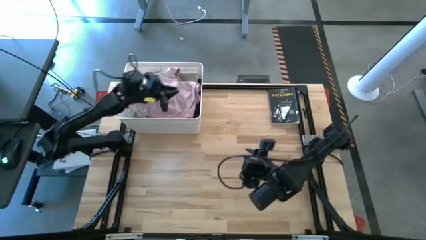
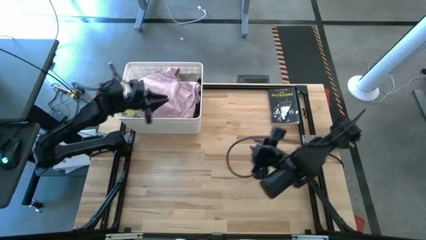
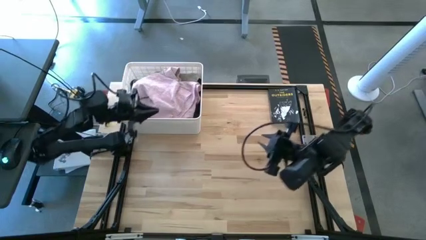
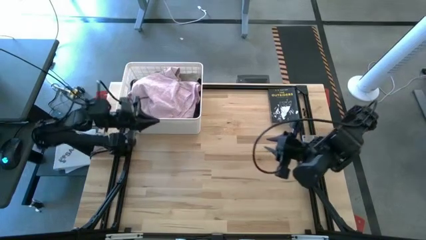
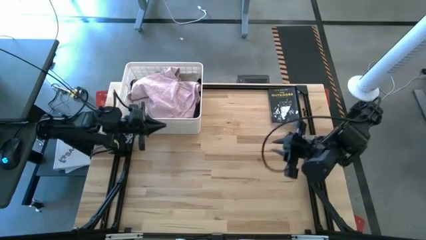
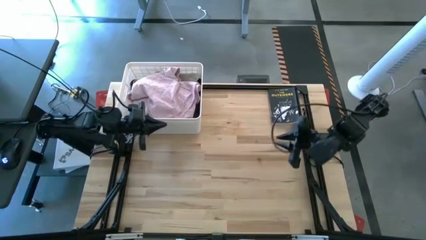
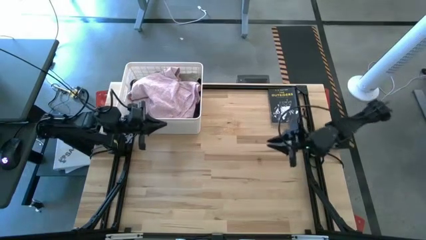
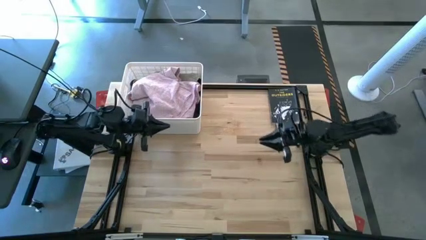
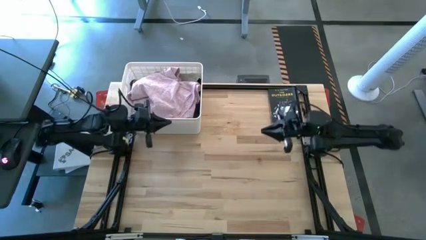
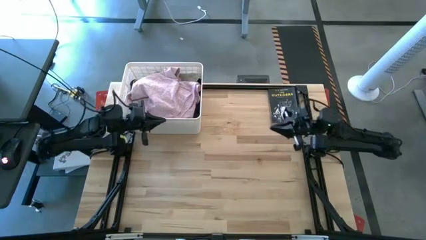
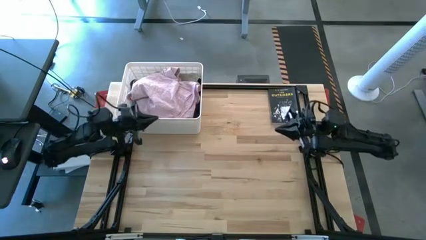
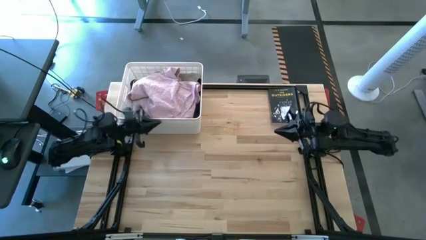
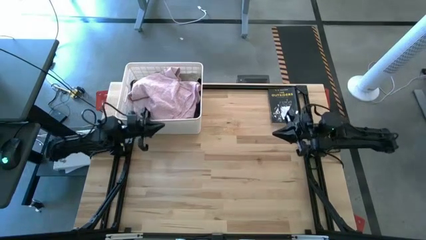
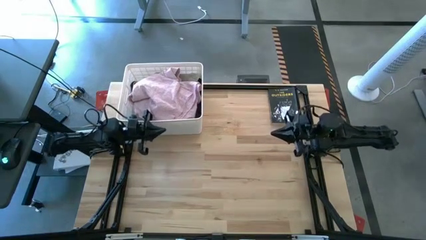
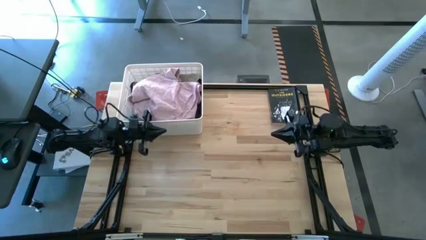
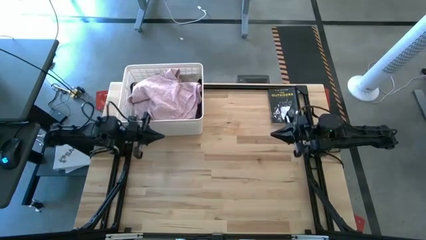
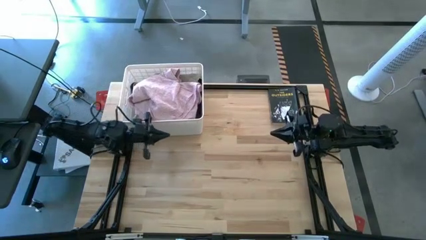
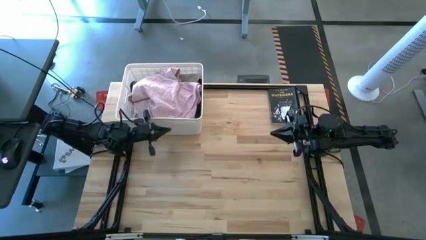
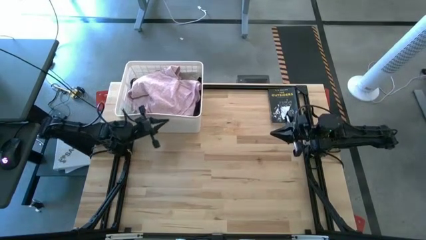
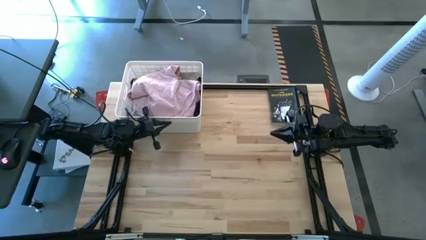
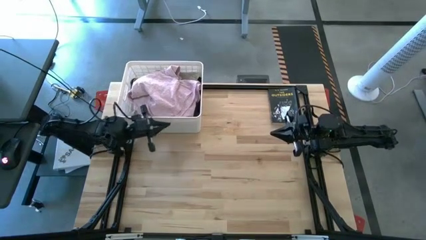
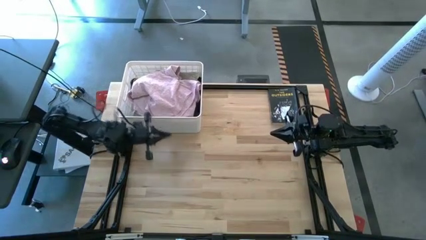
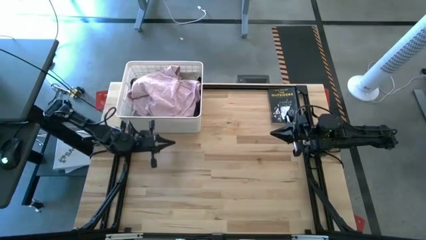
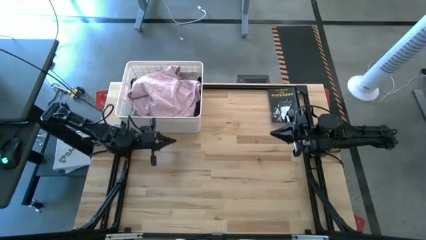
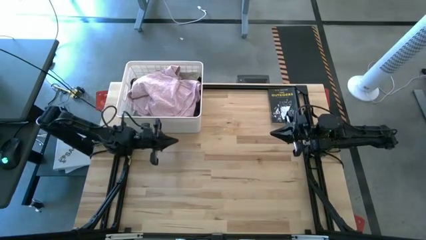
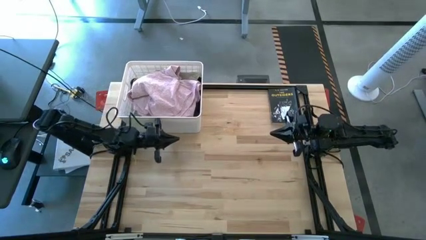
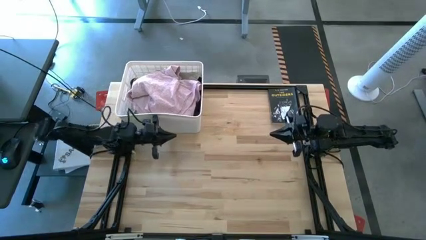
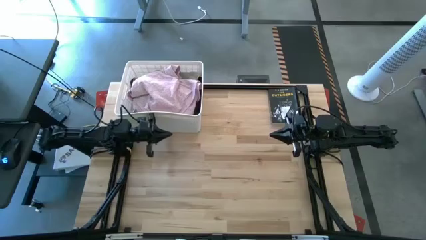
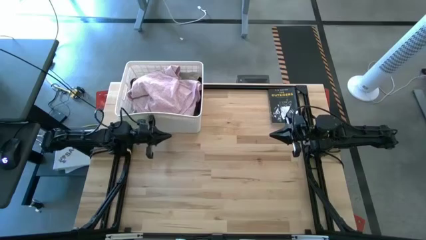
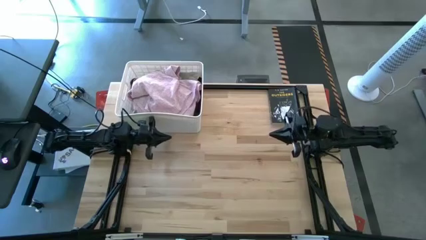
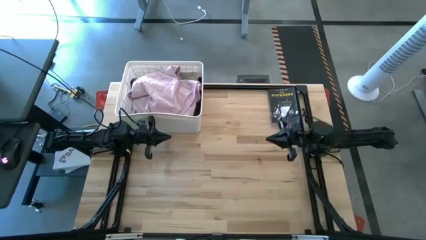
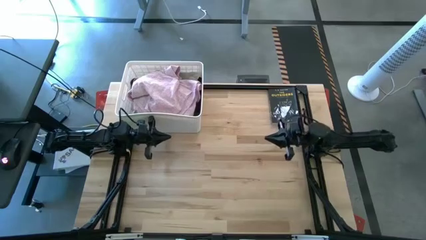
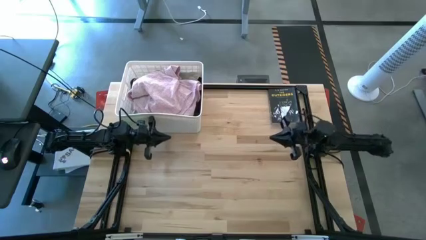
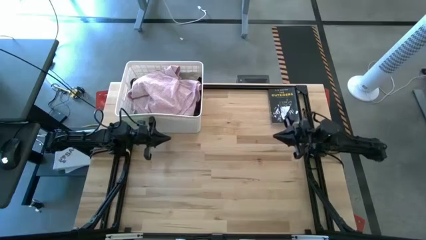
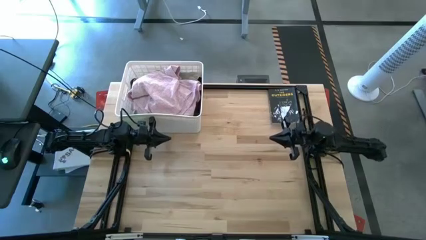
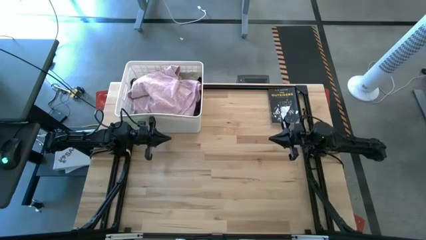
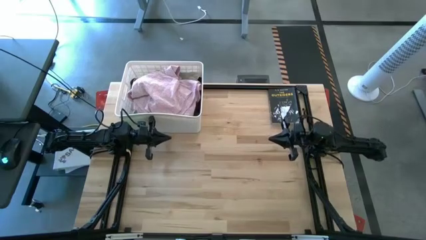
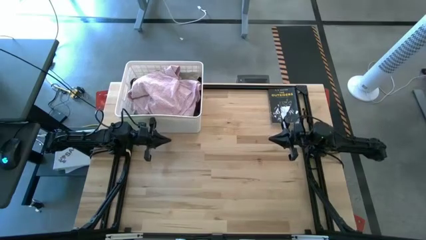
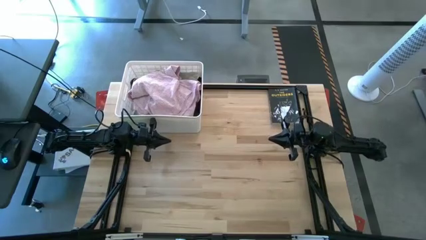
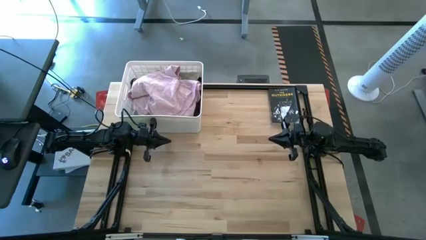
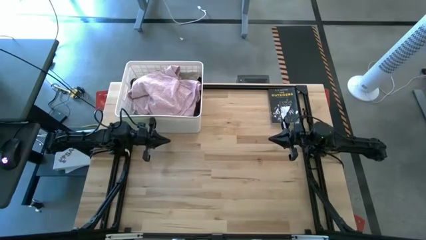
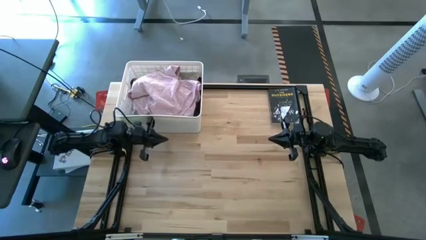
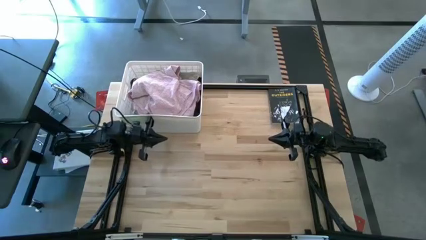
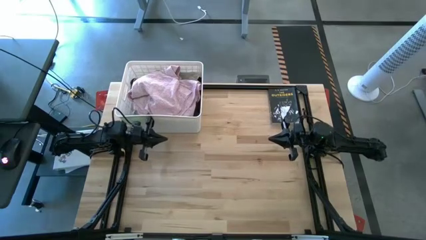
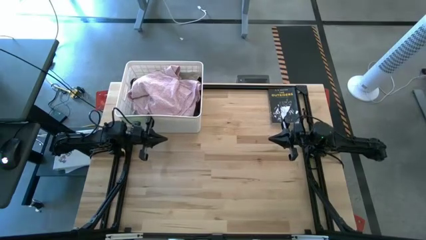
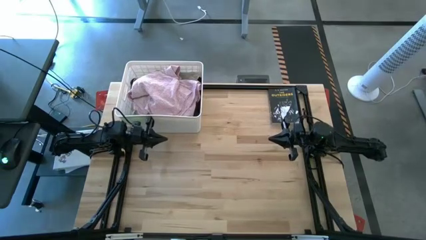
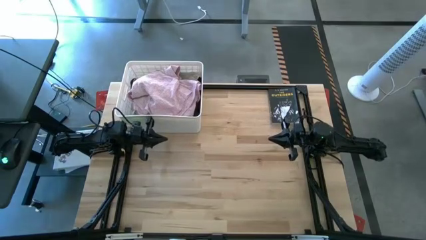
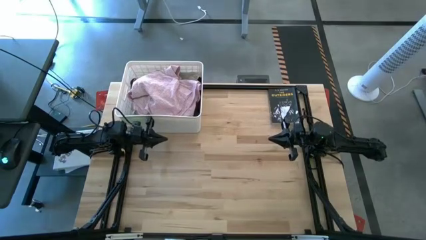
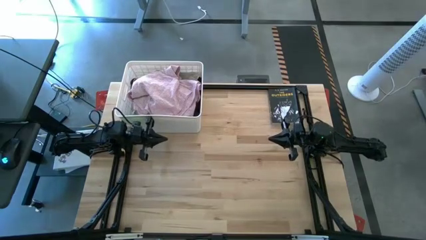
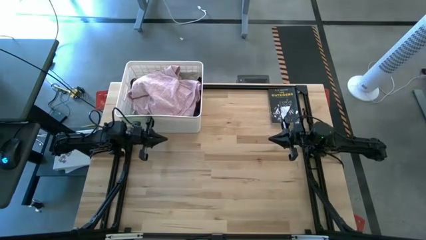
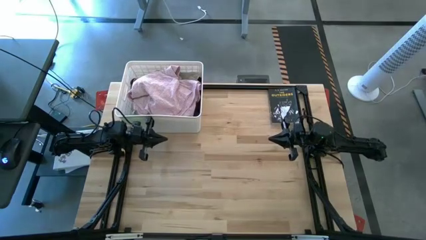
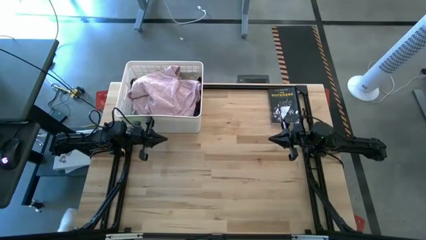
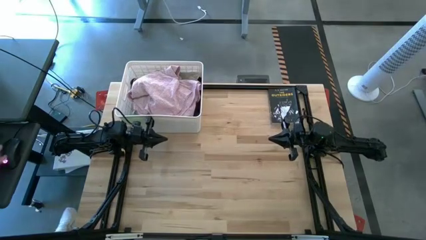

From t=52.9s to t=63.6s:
Task: Sort clothes
Return to Home Position

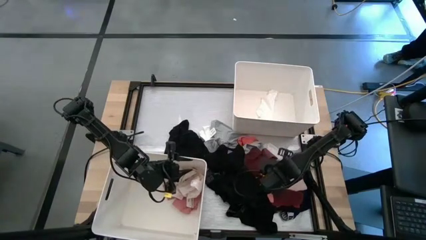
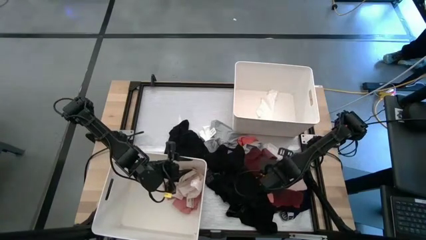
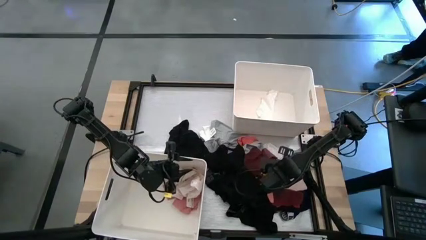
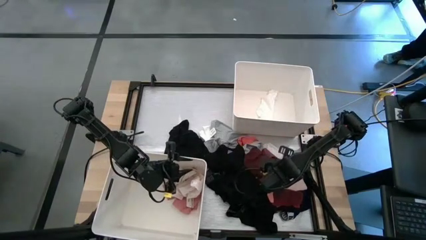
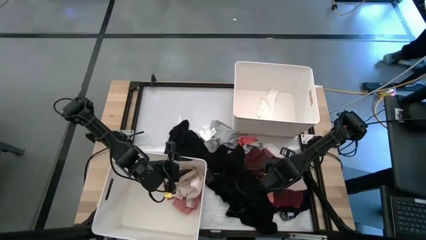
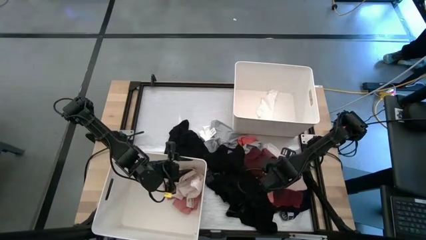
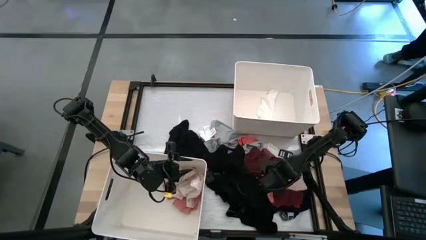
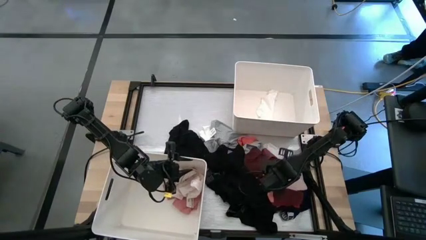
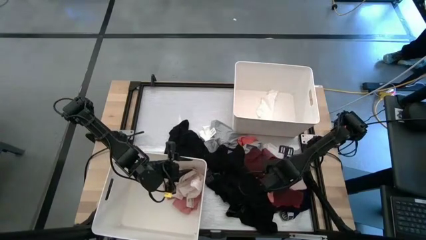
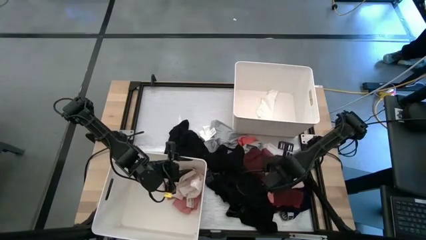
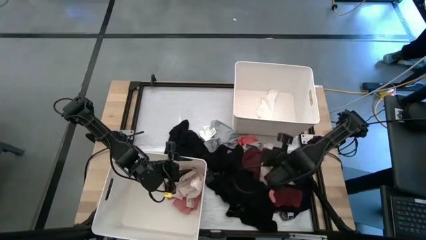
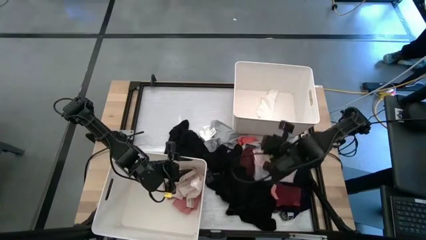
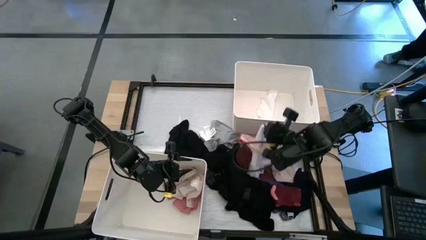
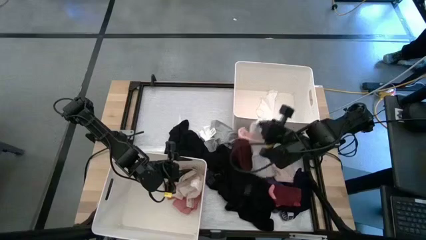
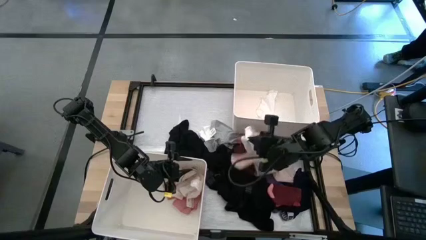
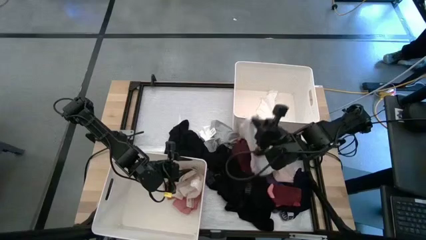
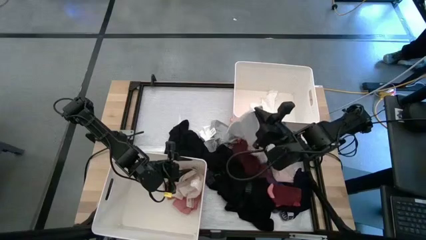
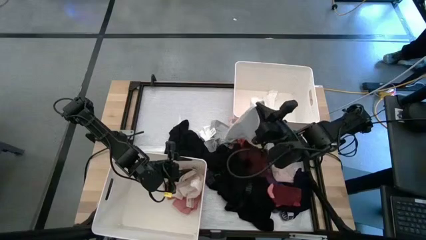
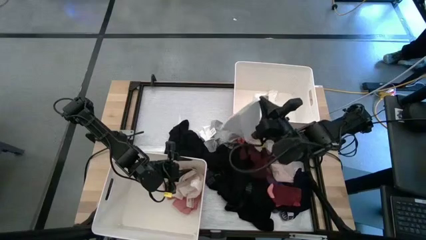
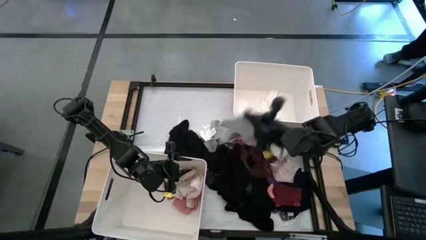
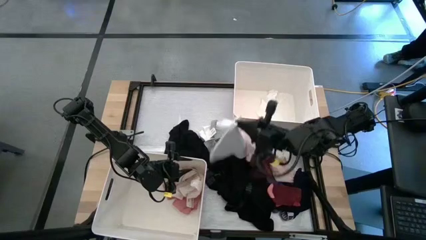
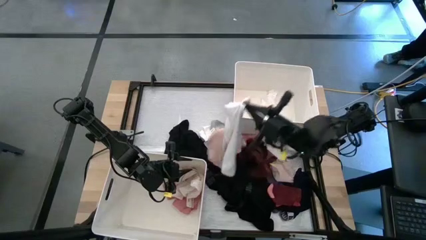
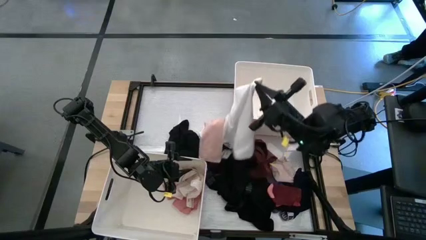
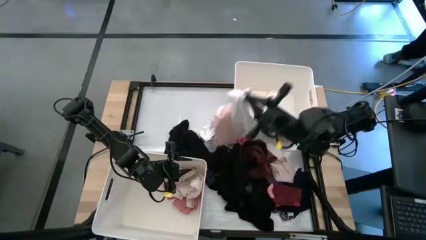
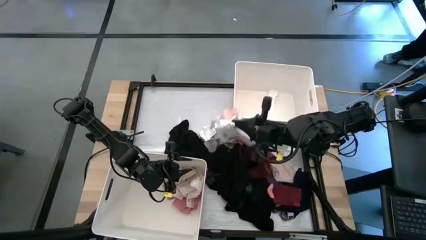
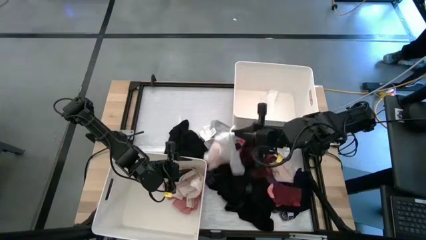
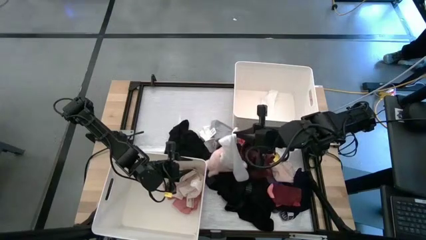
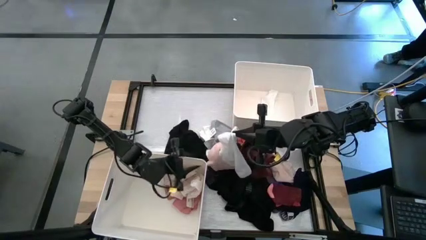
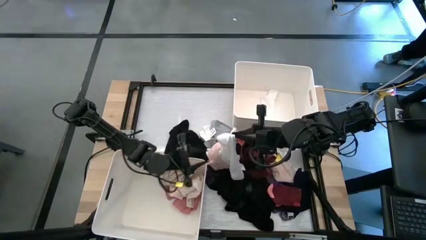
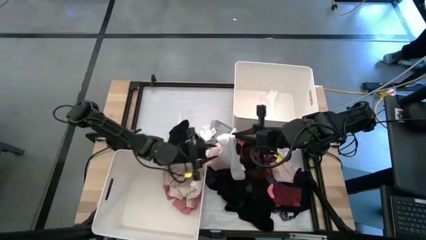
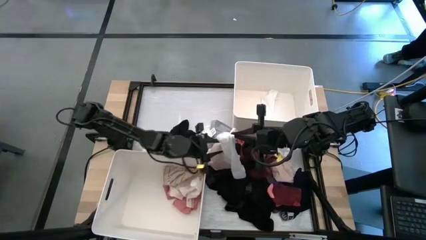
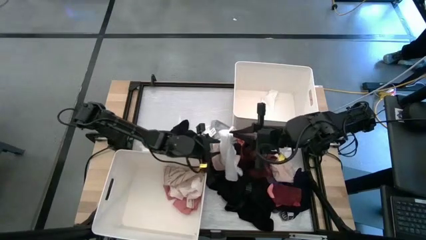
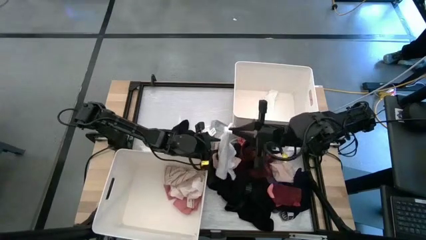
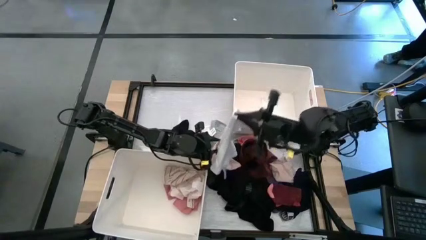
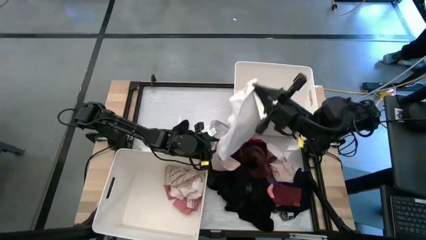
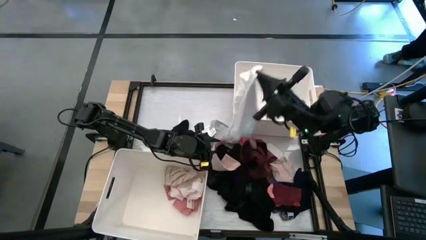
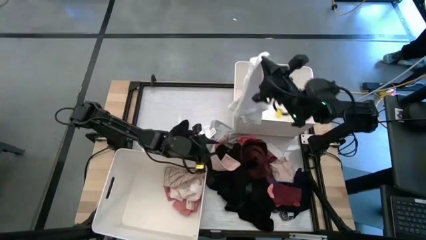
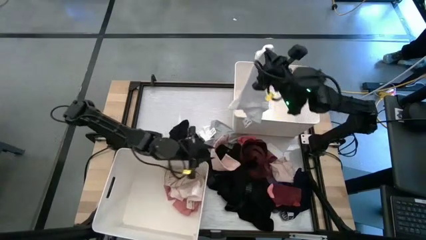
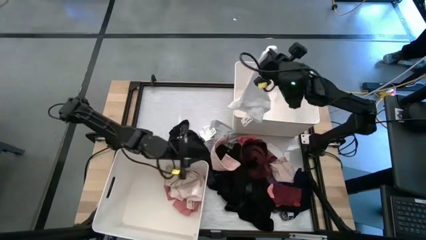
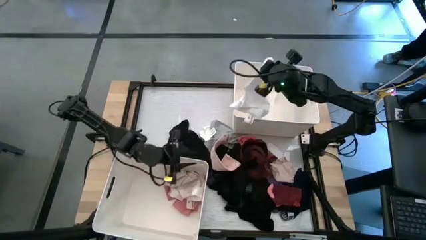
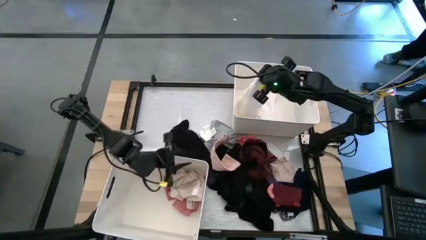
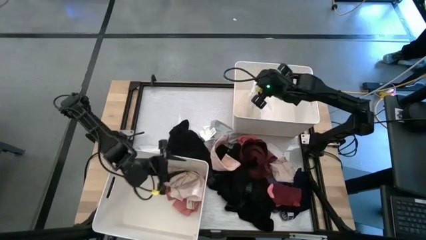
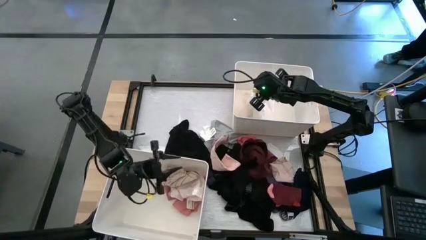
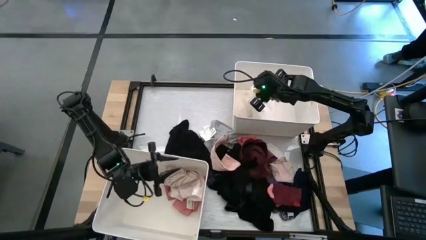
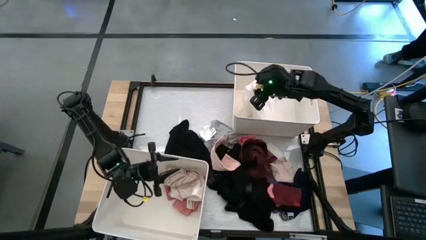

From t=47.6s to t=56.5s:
Task: Sort clothes
Put the white shirt into the top white bin
